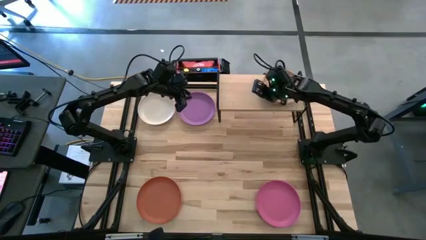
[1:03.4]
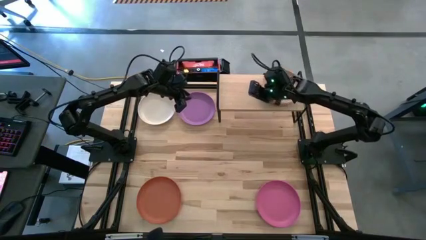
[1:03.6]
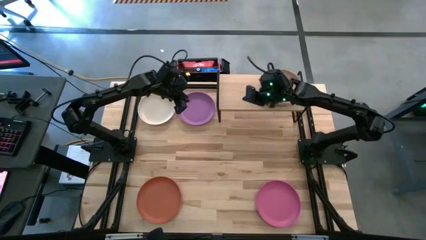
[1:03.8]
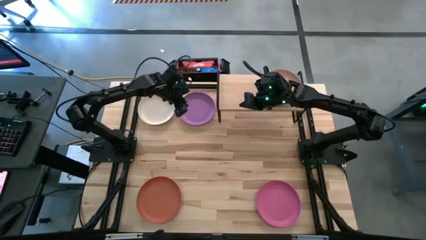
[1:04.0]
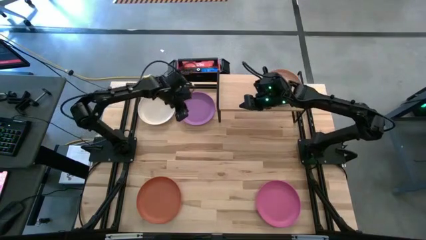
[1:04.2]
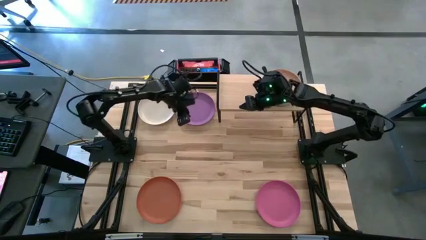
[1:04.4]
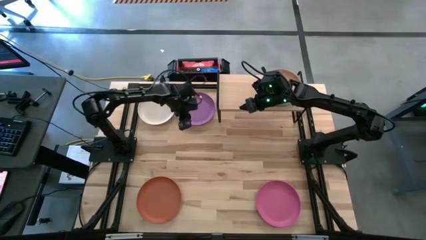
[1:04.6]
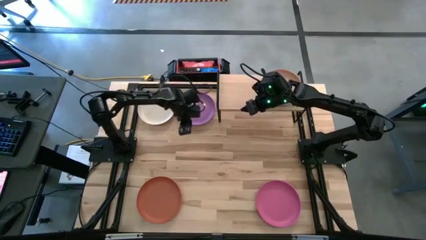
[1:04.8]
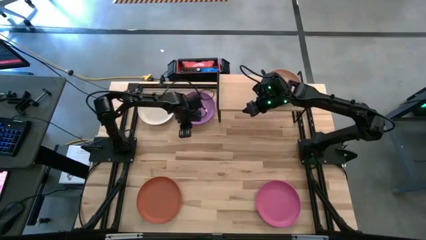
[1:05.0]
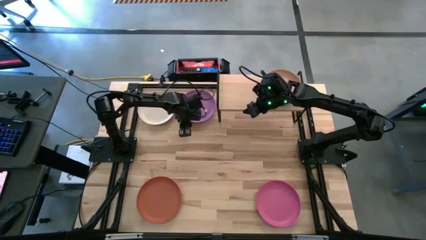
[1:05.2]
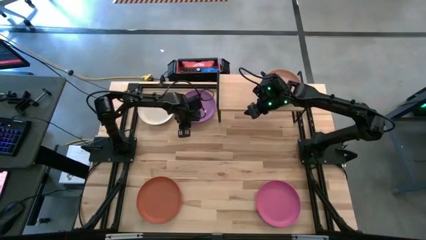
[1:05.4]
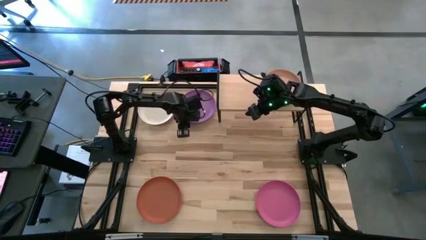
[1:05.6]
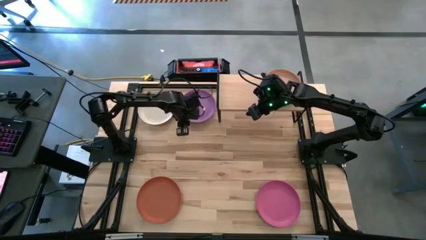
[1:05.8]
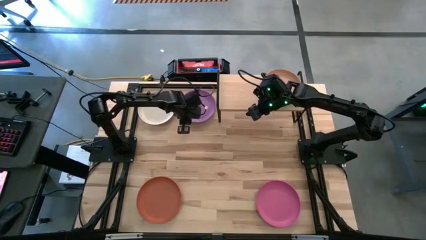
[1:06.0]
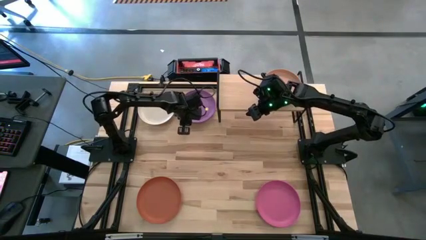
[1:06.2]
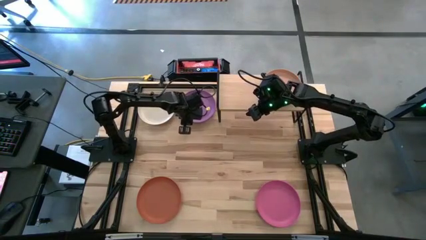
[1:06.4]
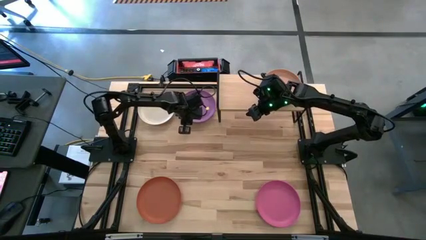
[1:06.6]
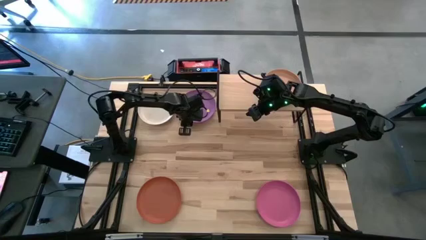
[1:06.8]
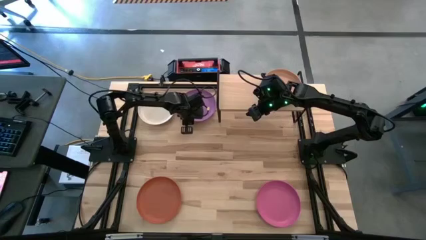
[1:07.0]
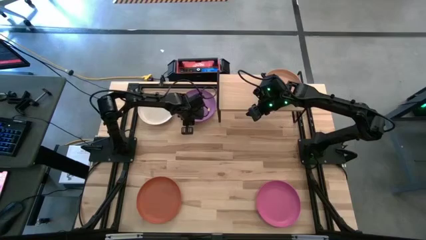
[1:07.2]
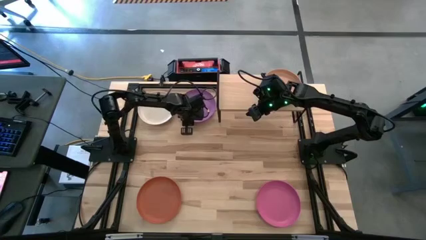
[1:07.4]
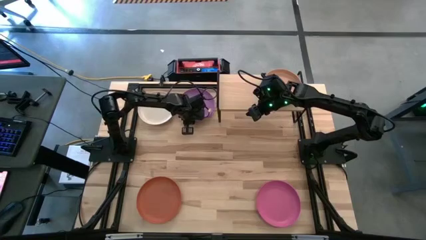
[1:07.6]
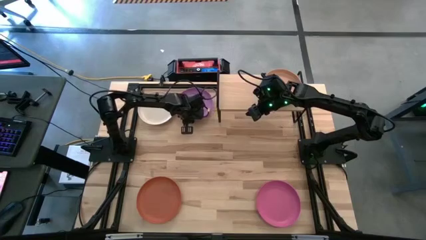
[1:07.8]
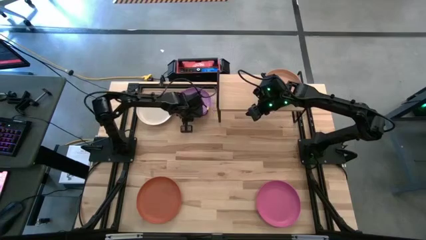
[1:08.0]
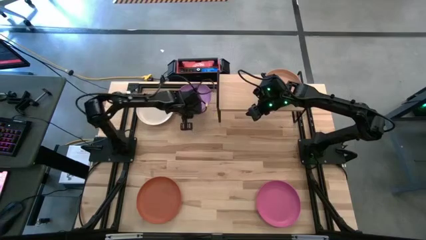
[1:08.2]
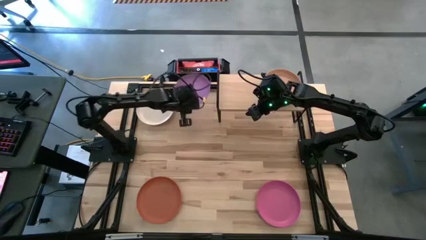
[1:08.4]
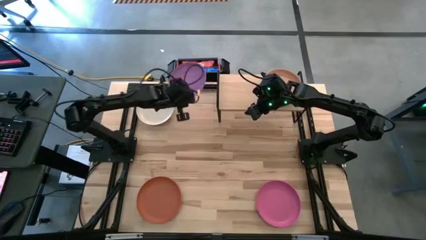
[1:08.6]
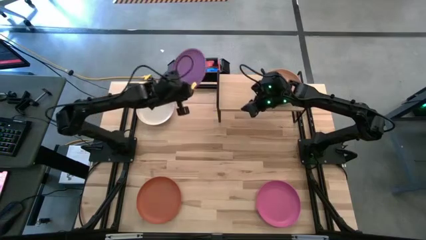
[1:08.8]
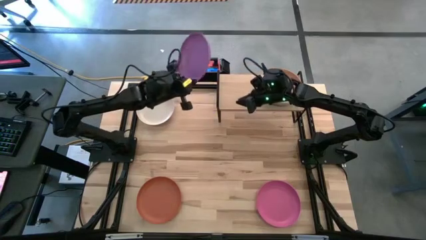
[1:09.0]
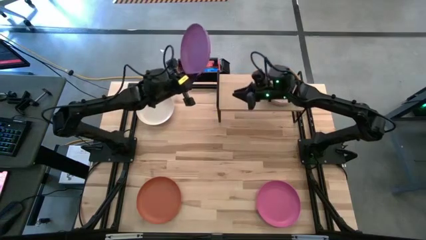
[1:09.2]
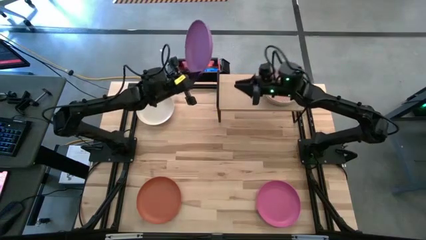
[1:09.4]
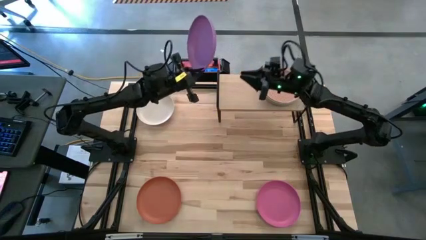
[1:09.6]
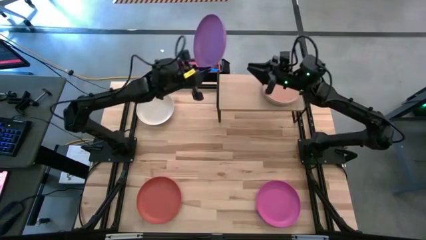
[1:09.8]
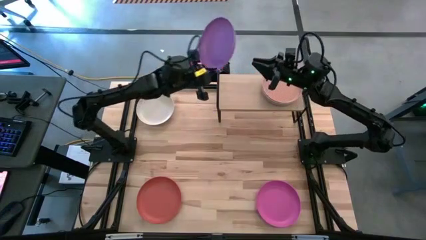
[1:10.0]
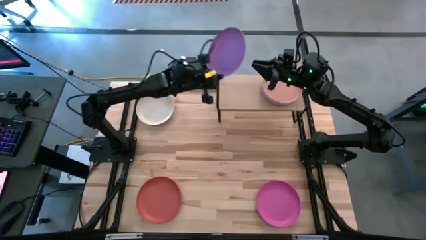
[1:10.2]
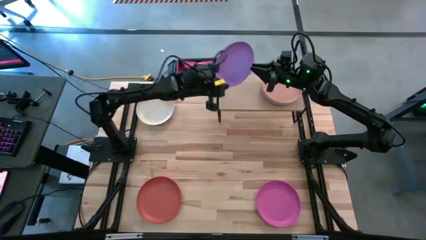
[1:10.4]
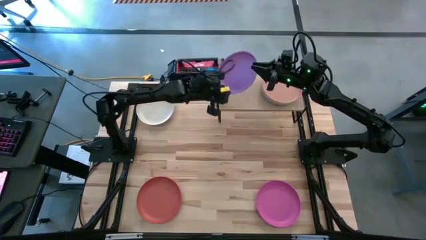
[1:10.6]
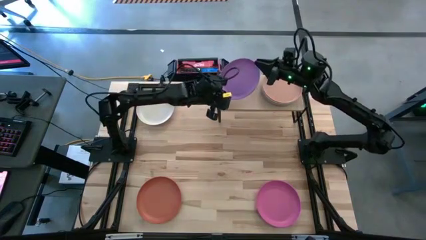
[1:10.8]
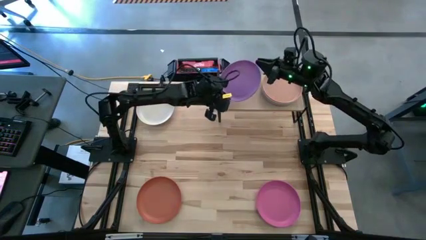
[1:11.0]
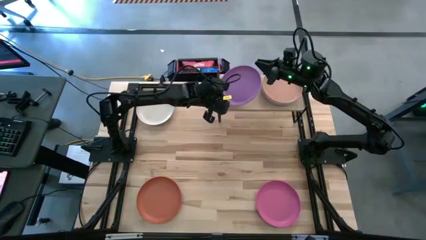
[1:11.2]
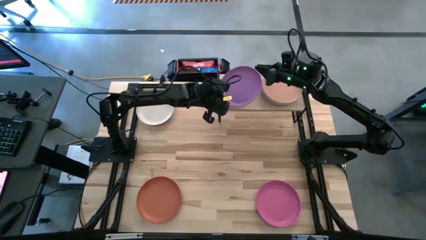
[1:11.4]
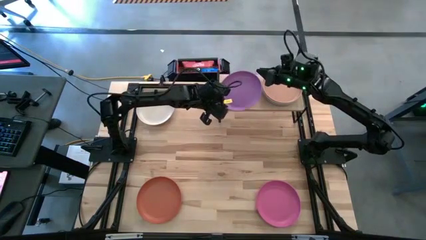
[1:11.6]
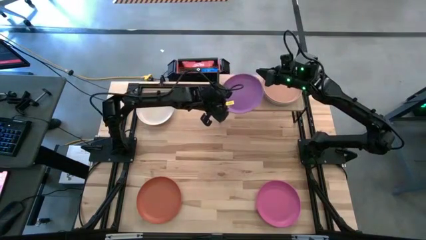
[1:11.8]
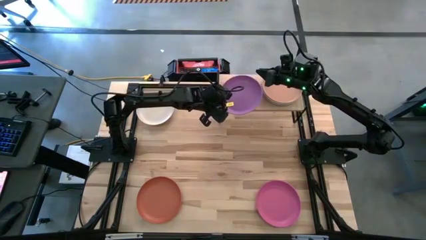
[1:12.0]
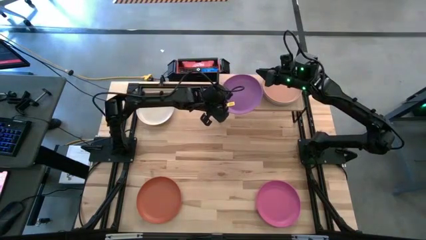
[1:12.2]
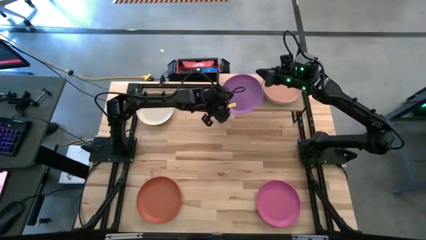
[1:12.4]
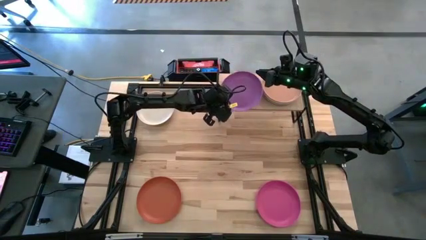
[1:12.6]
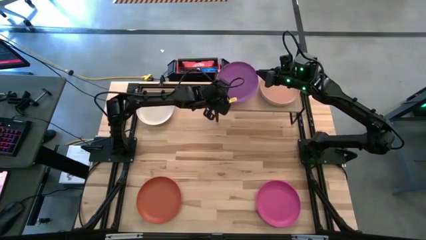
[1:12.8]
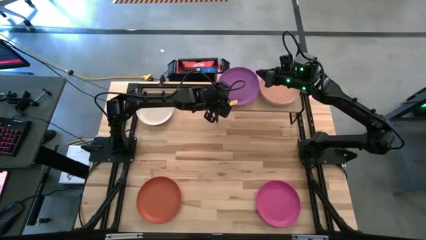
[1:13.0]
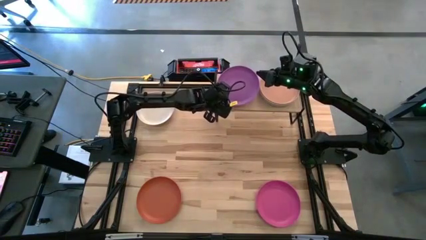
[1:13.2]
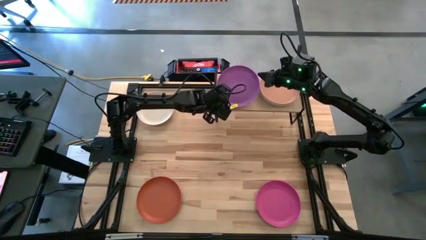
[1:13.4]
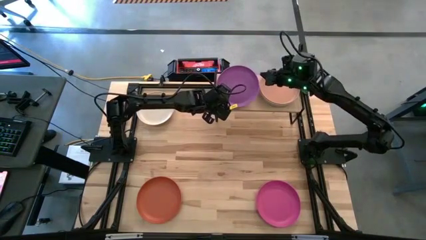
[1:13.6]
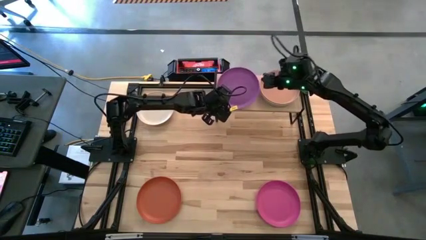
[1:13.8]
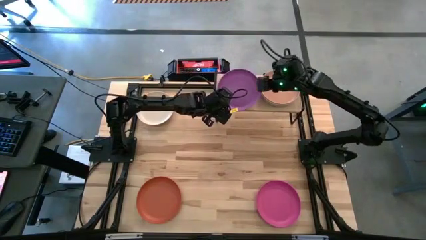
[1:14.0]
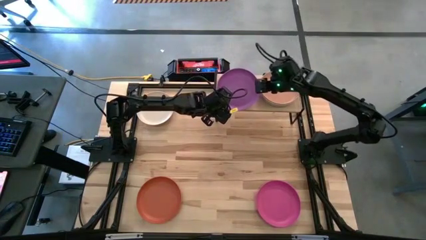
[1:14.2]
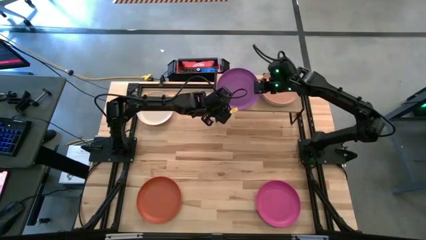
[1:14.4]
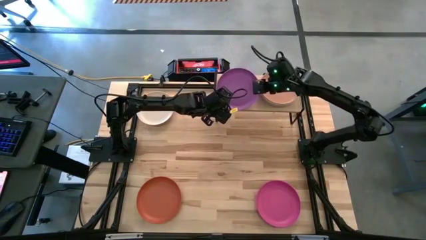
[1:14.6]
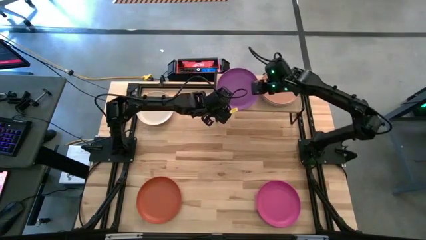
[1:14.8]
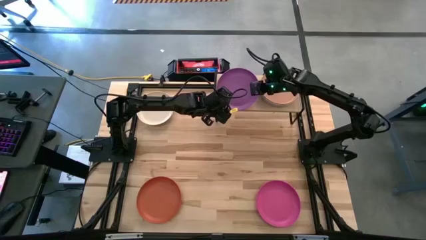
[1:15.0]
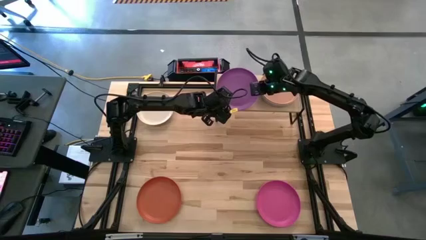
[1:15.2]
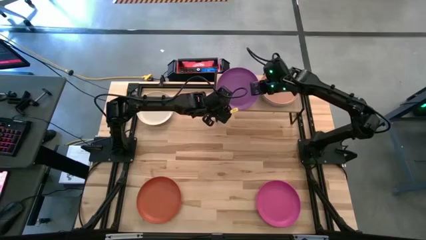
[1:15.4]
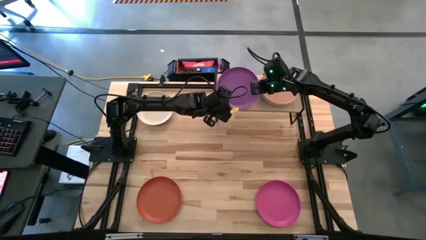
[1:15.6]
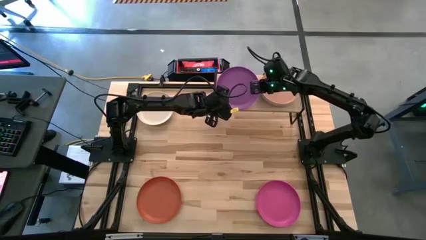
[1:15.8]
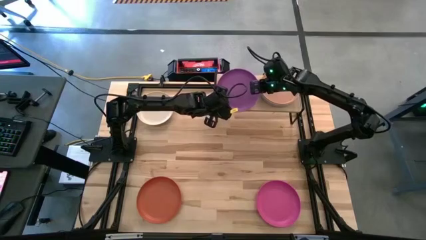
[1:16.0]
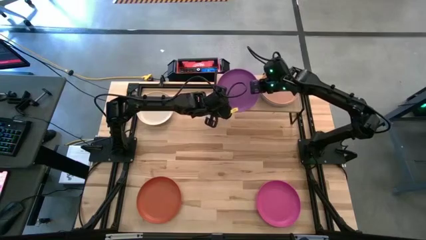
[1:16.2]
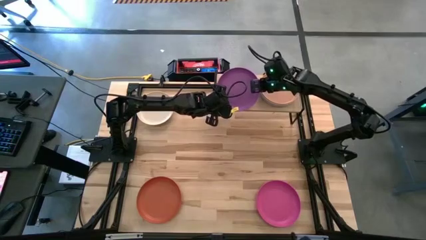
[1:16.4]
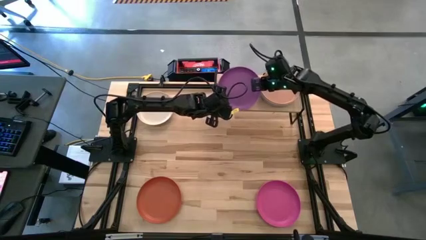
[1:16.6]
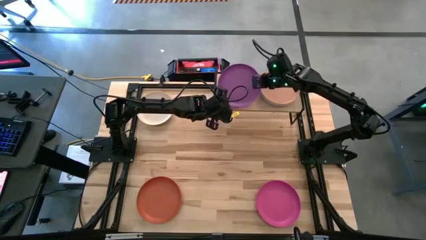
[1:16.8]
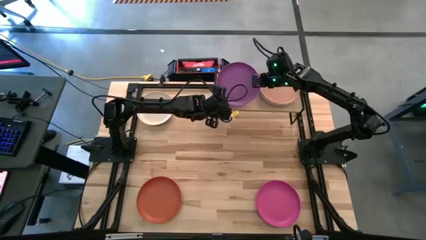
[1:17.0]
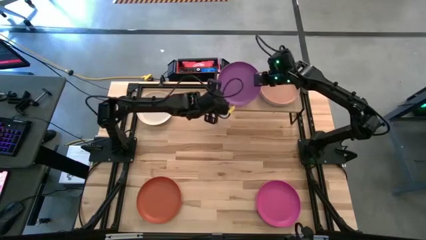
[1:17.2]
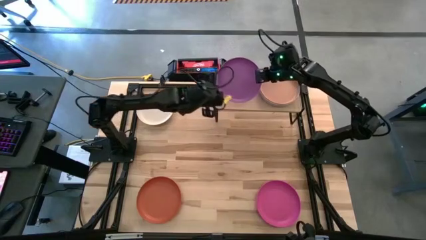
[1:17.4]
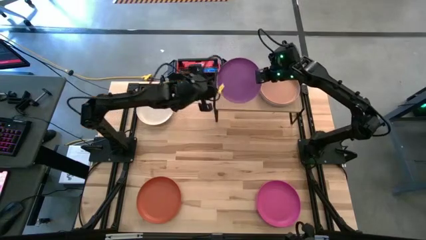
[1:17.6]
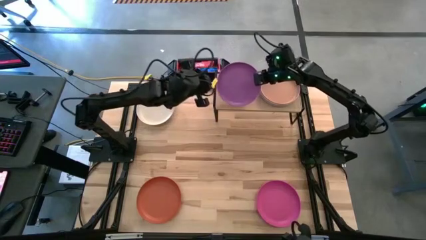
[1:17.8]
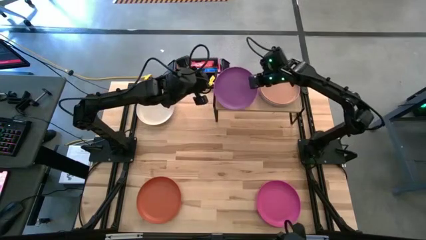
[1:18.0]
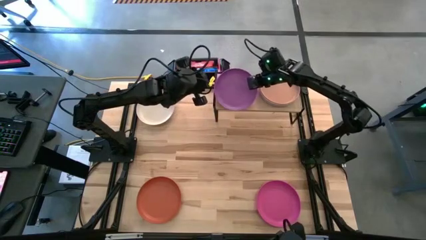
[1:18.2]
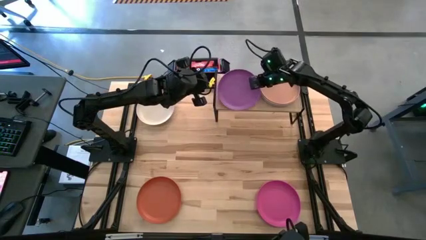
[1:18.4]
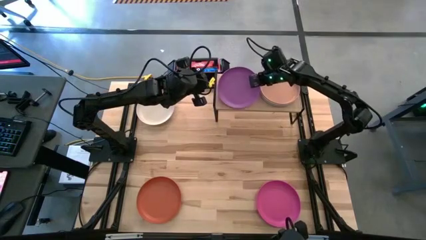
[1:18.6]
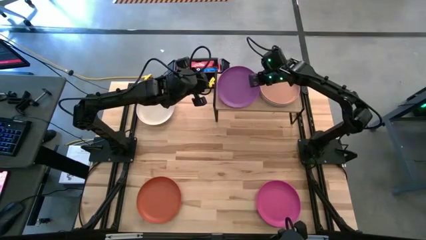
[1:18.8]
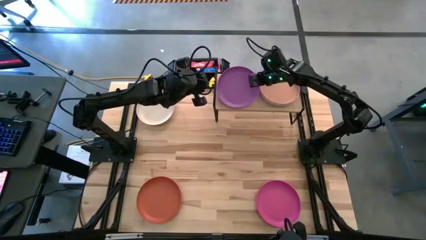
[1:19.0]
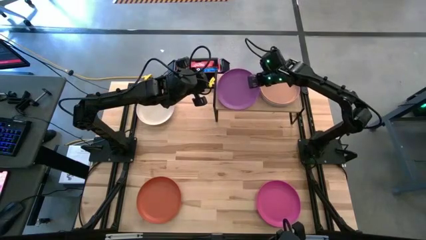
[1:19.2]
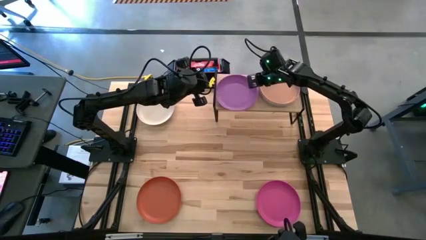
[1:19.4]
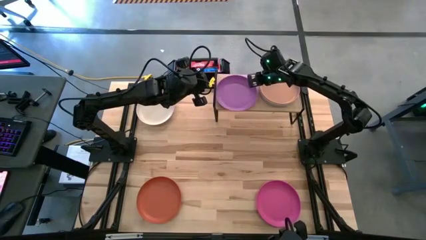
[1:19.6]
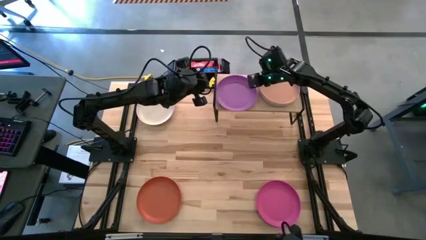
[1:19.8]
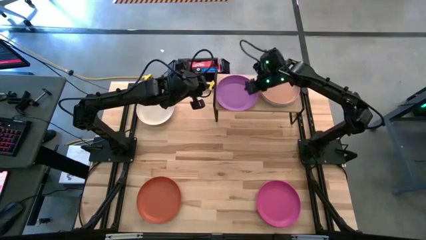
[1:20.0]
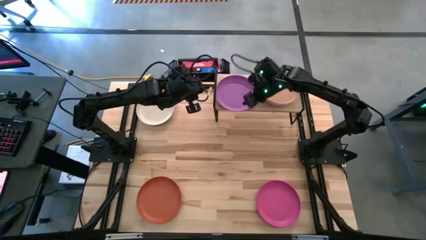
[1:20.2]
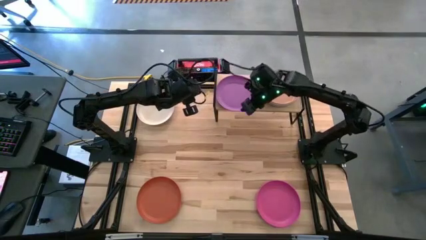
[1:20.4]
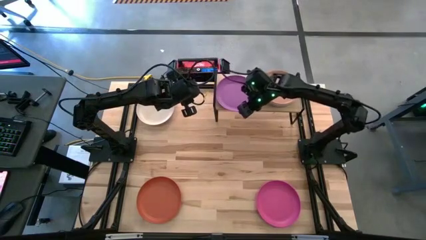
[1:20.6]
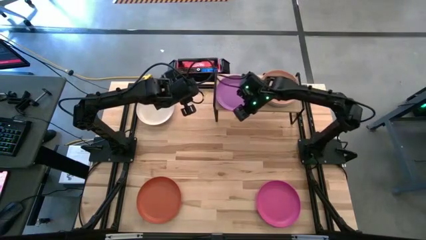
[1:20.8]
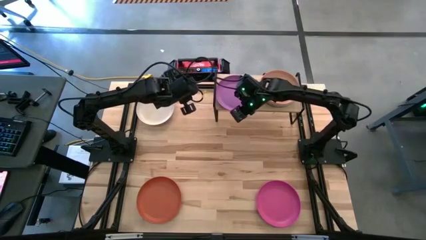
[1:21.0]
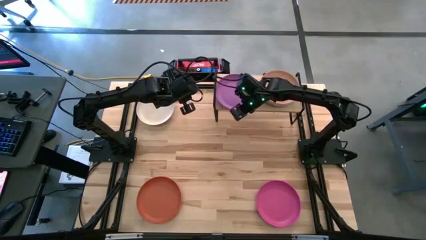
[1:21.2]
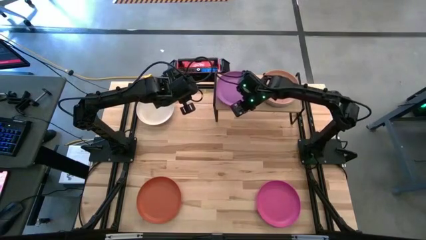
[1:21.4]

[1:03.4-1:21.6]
Task: Place and stack plates onto a shelf
Put the purple plate on the shelf
